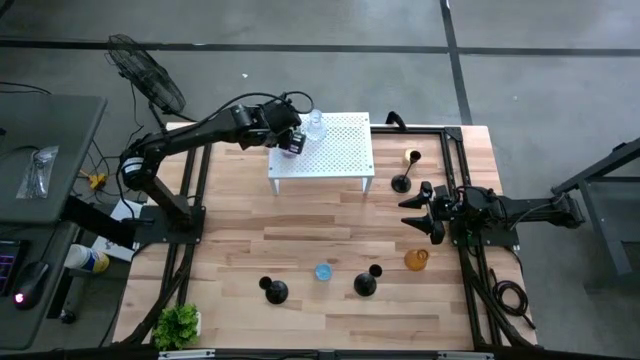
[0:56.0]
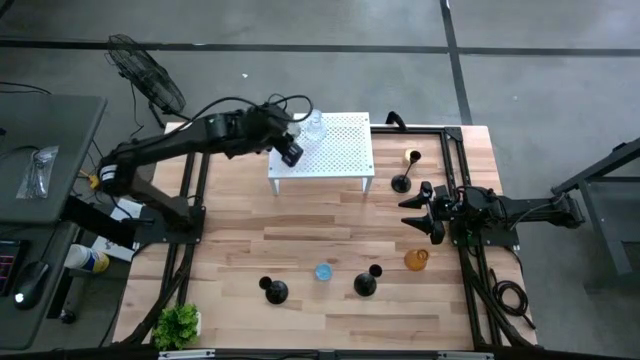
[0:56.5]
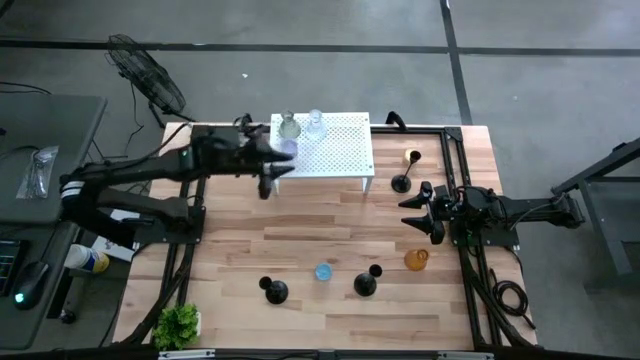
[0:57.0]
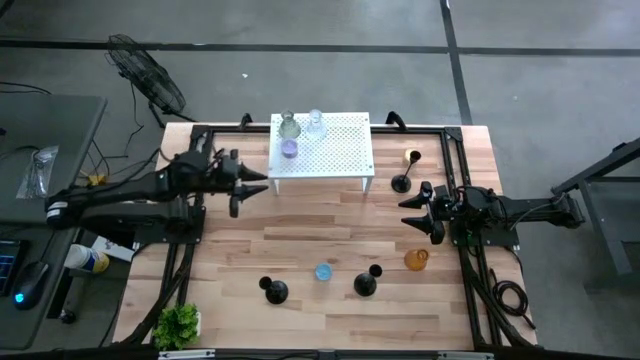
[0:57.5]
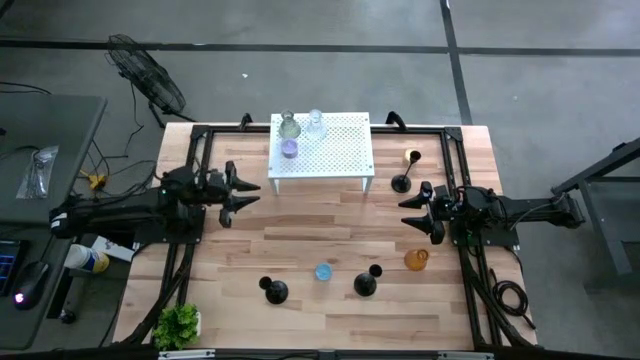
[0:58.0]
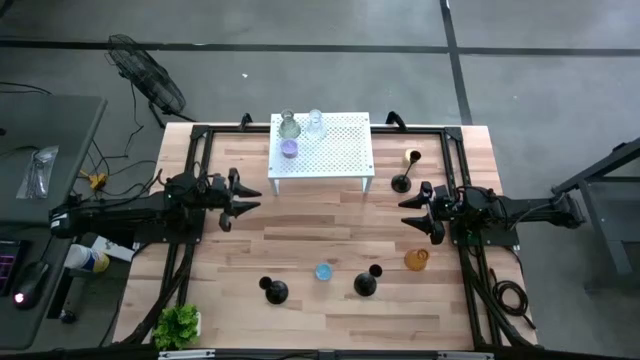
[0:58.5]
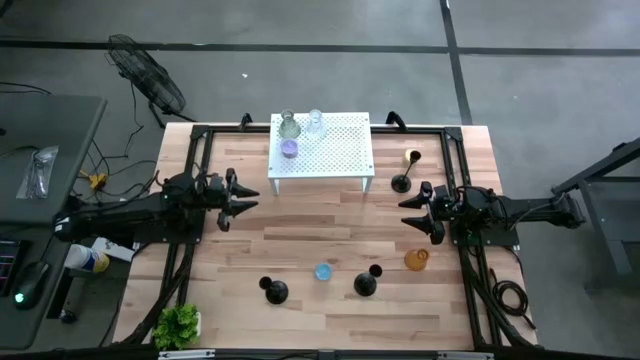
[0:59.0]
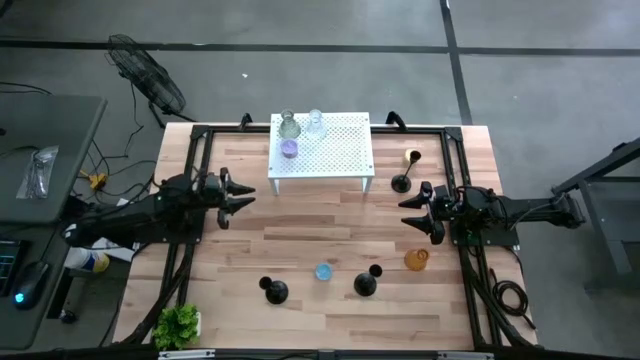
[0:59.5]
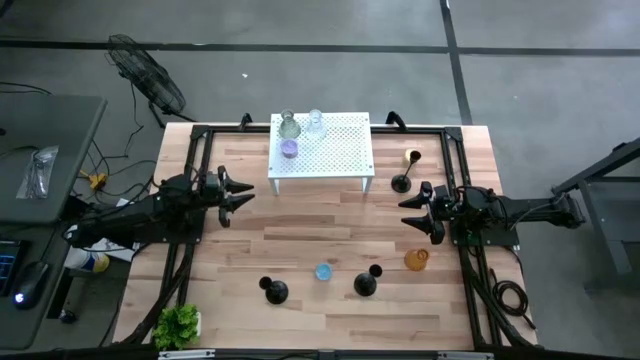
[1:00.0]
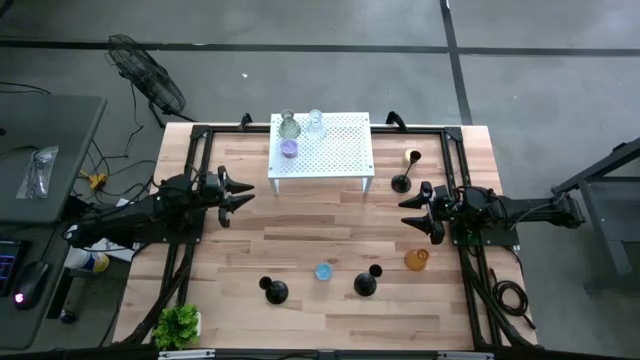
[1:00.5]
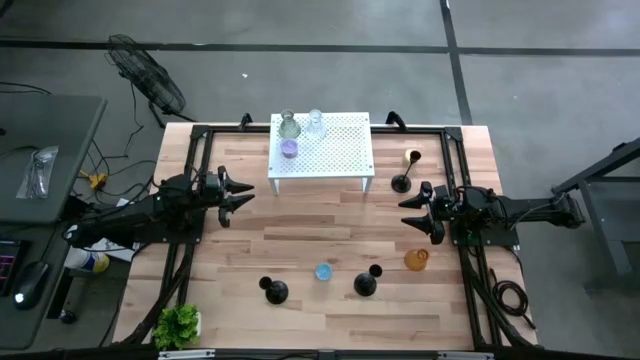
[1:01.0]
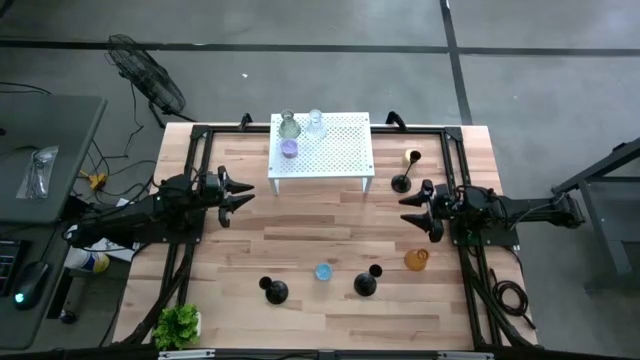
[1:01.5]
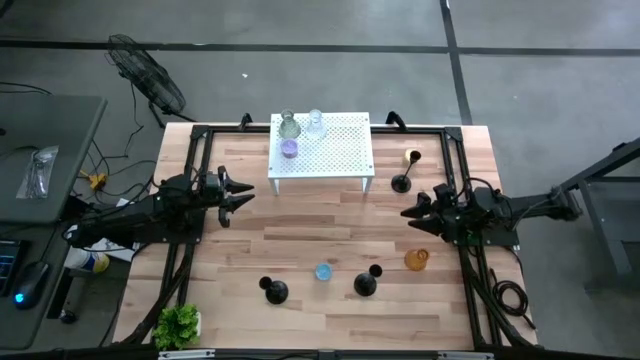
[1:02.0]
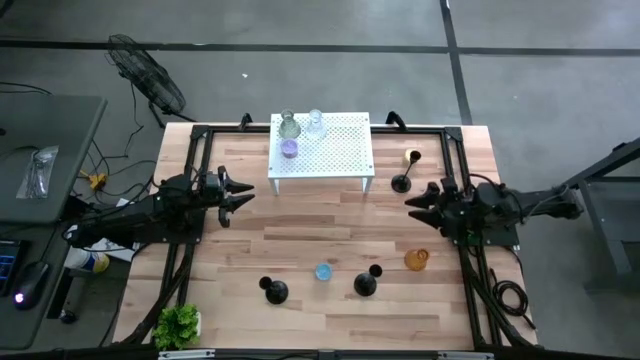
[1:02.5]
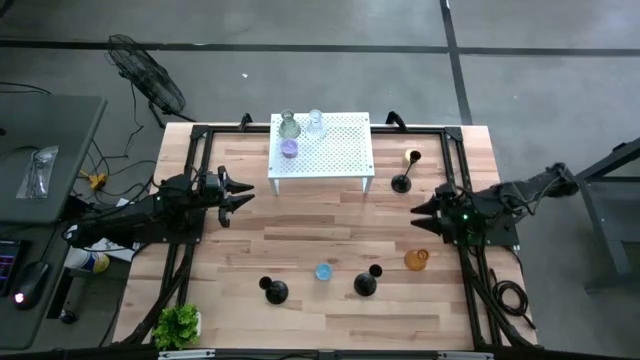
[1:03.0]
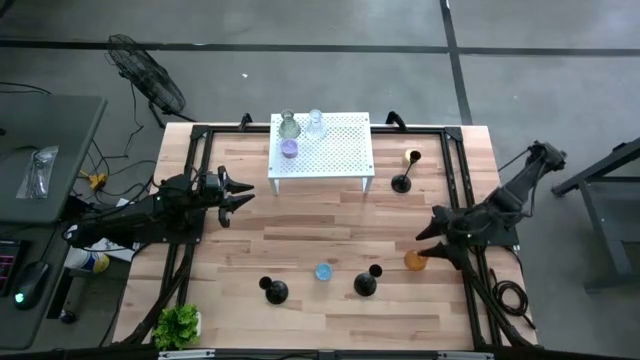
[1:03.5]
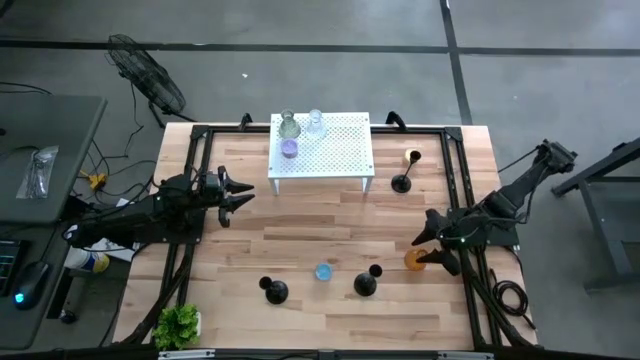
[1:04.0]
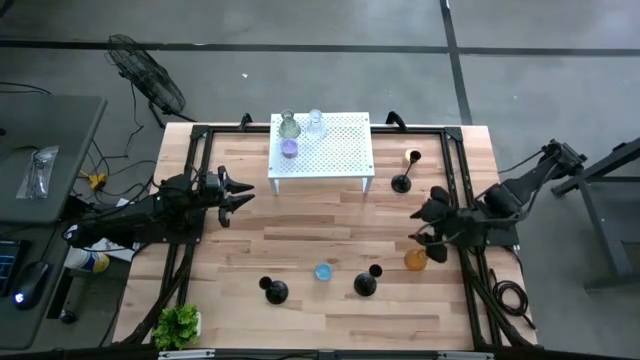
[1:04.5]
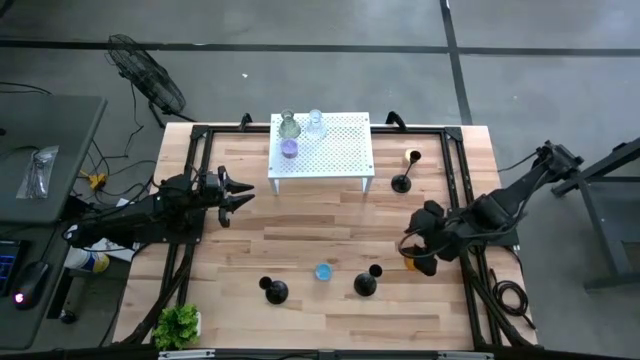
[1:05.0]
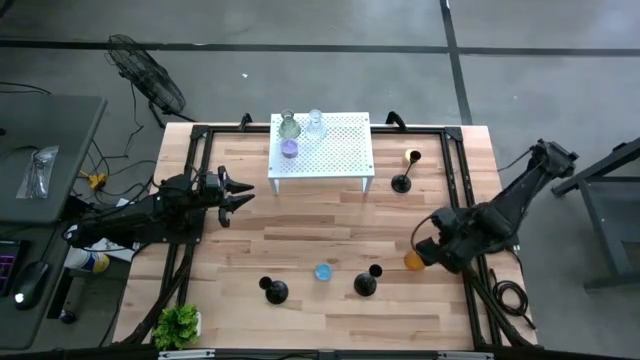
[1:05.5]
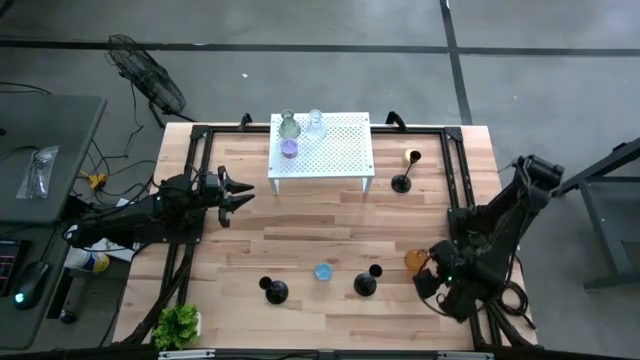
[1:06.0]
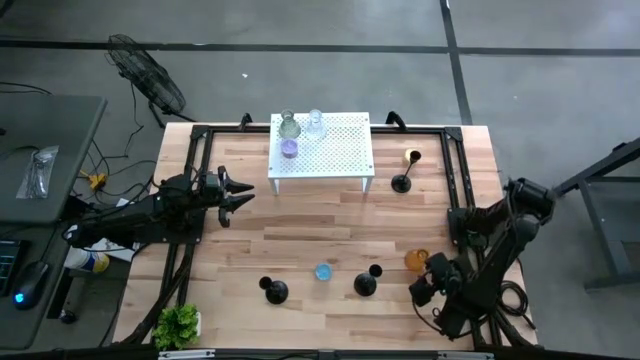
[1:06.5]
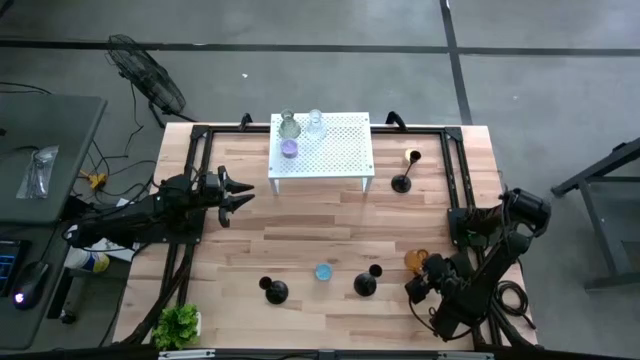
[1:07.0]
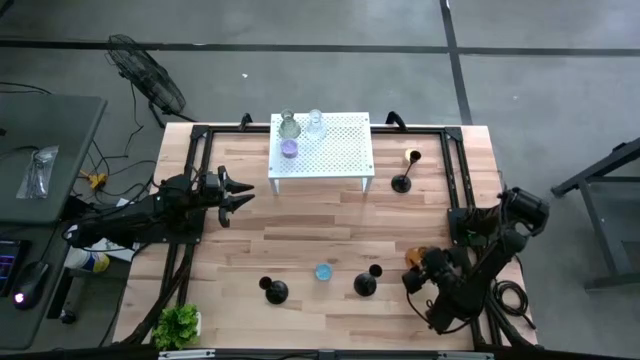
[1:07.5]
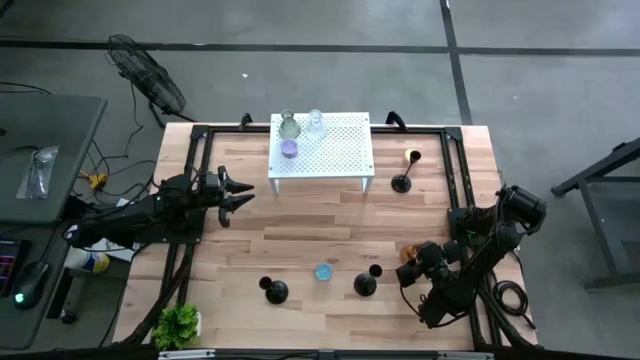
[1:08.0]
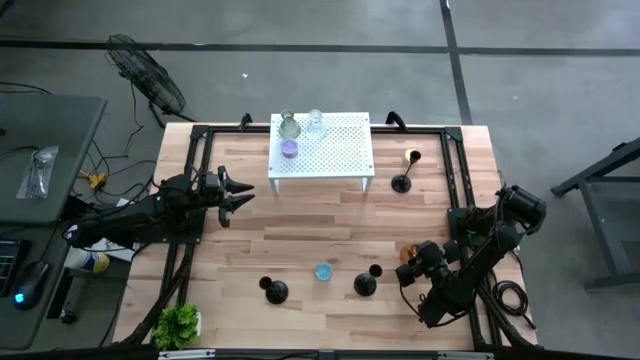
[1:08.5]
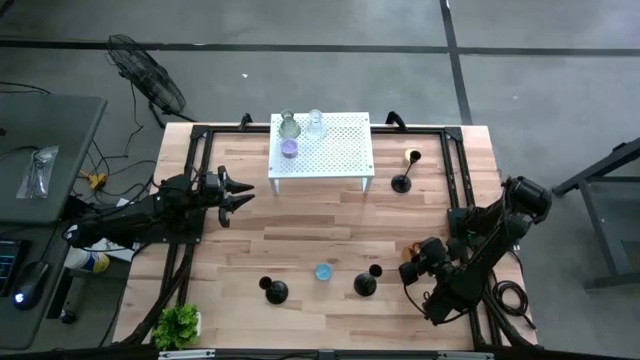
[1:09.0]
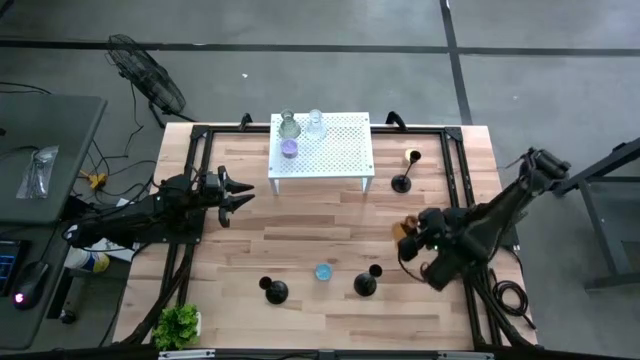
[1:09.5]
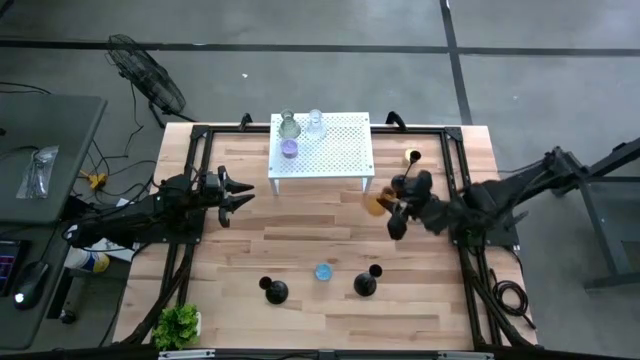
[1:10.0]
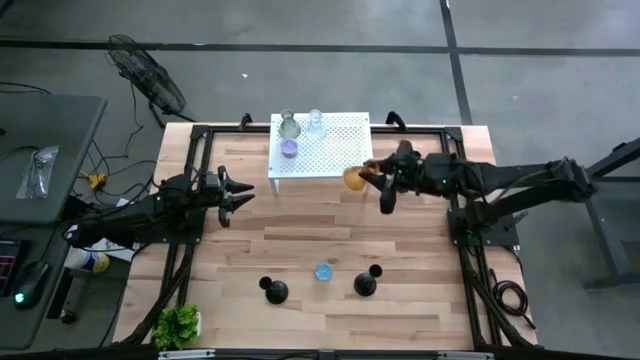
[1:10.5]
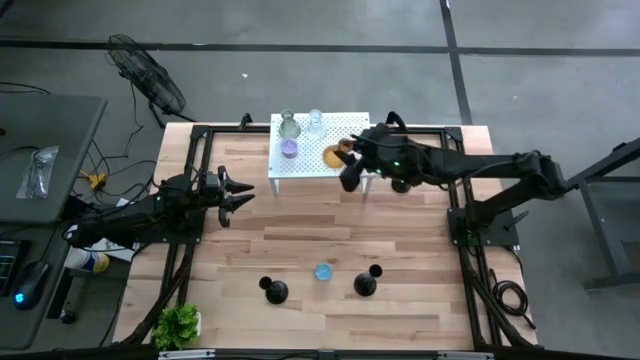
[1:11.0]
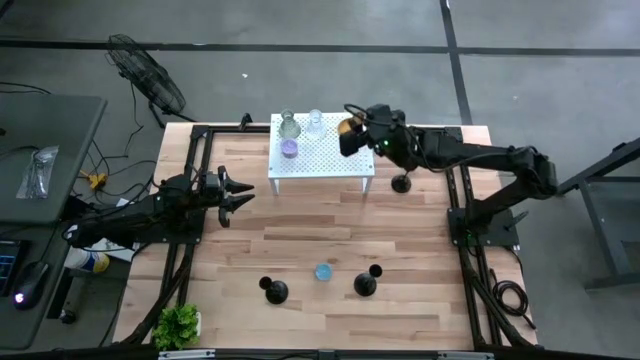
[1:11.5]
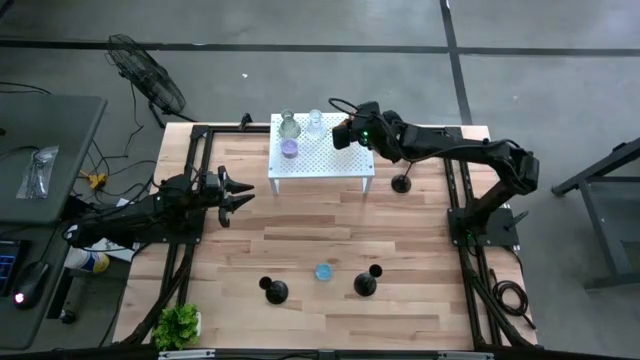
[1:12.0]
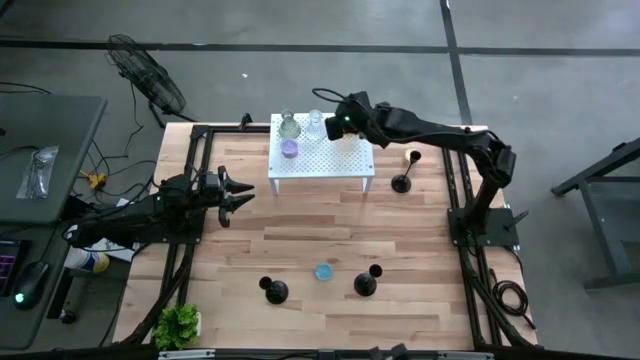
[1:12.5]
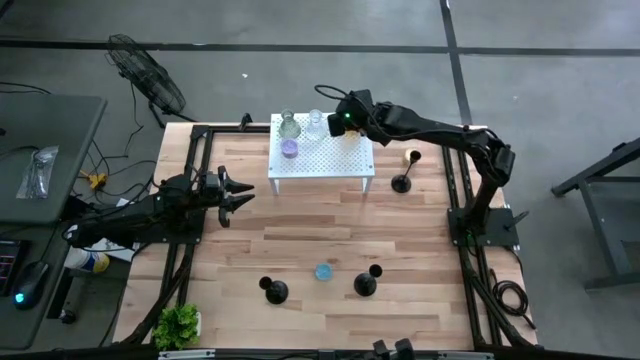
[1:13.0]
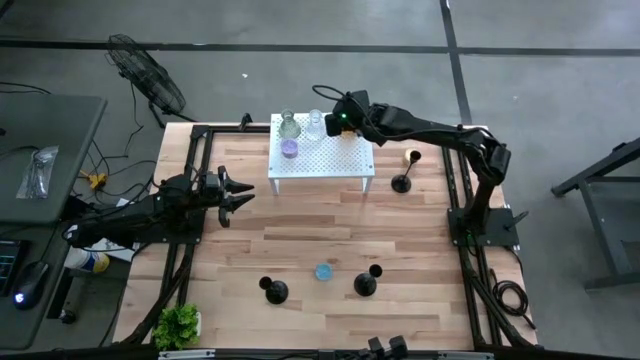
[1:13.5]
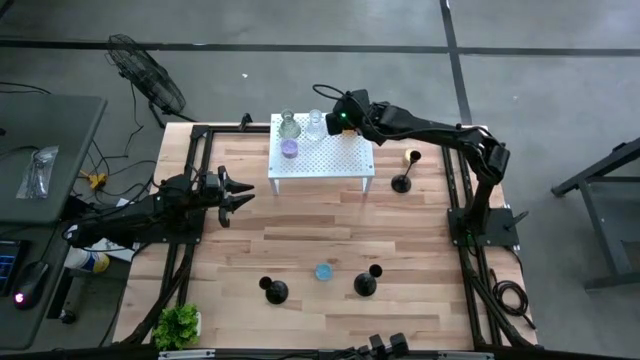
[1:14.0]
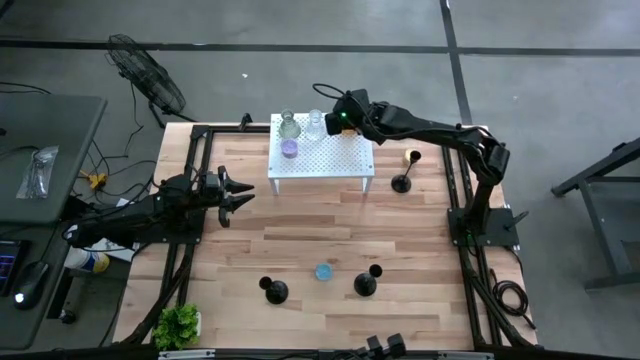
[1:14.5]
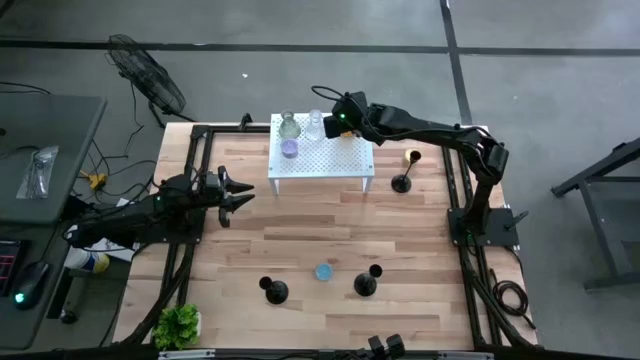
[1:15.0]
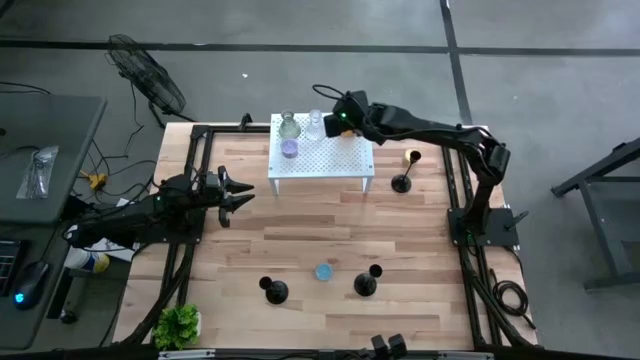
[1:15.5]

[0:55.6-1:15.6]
Task: Pick & Place candle stick holders
Put the orange glass candle holder on the shelf aligned with the other glass candle holders
